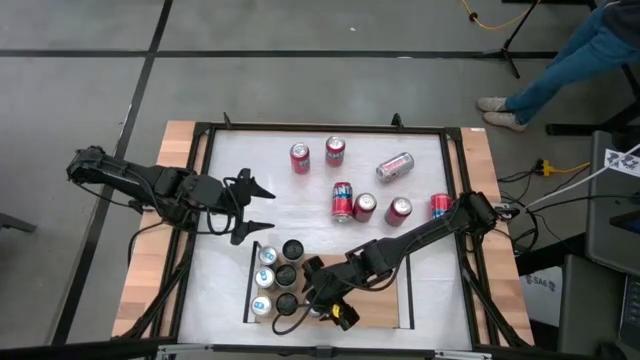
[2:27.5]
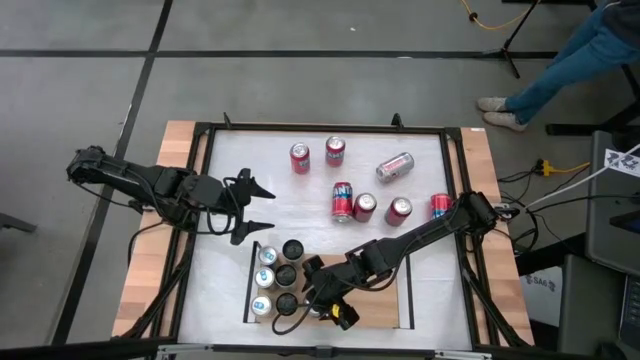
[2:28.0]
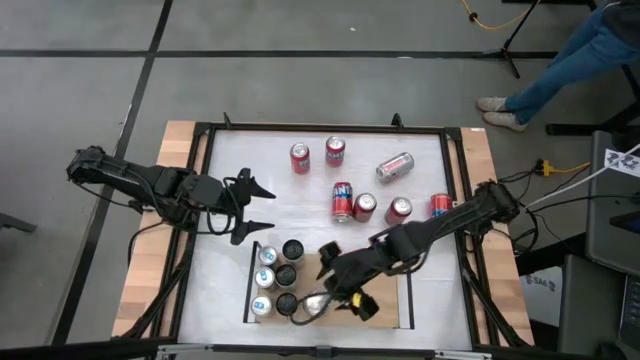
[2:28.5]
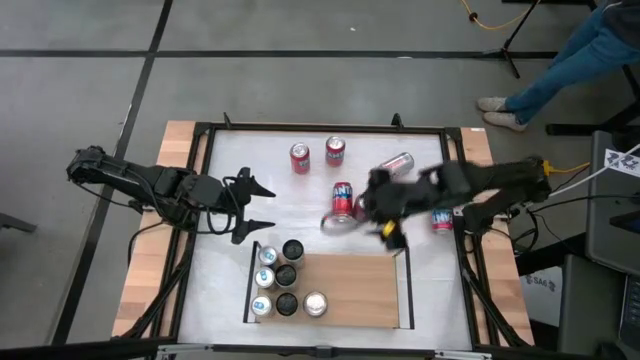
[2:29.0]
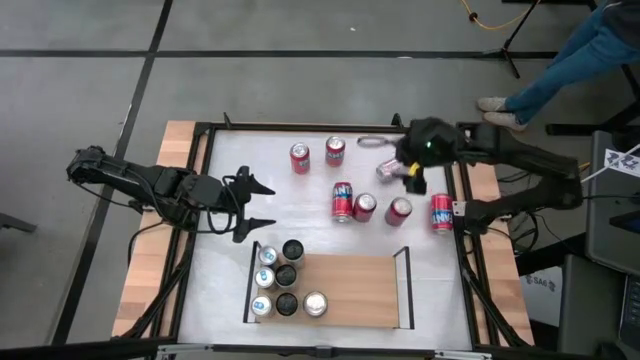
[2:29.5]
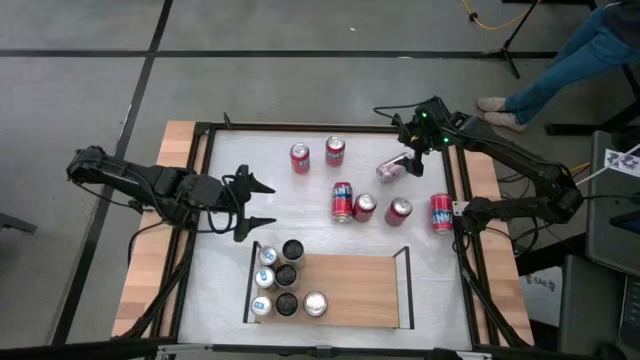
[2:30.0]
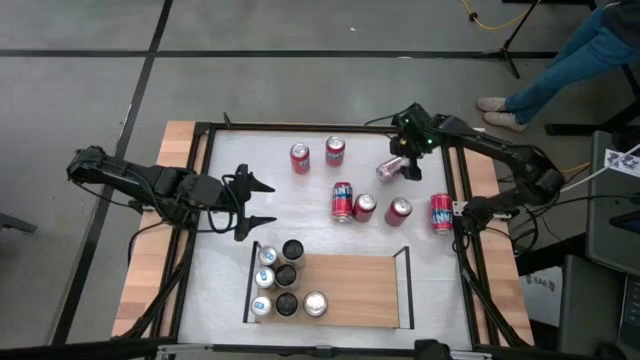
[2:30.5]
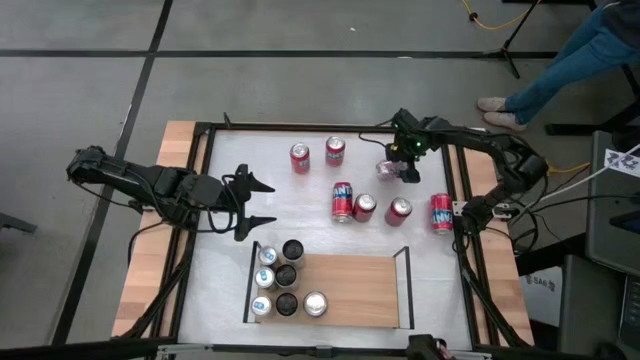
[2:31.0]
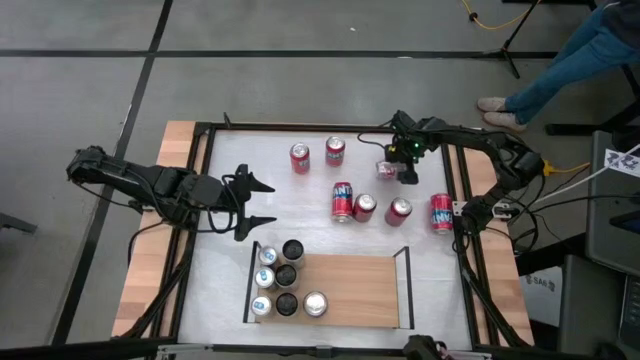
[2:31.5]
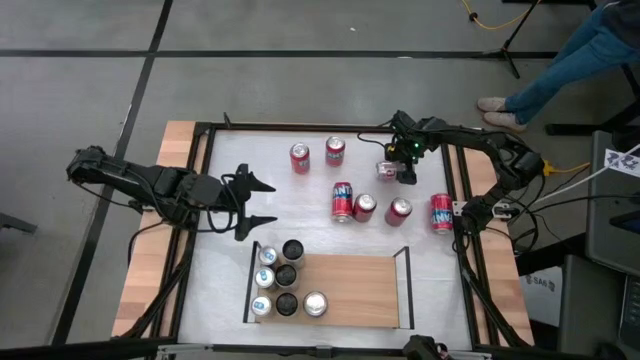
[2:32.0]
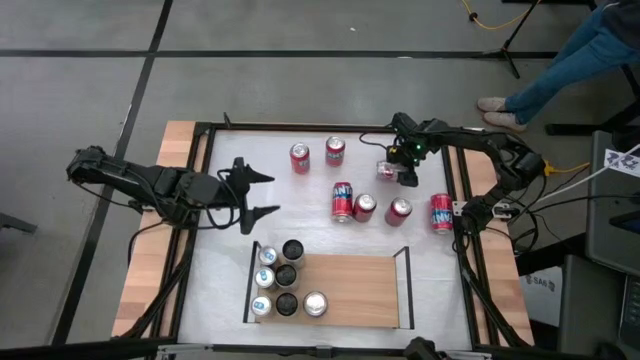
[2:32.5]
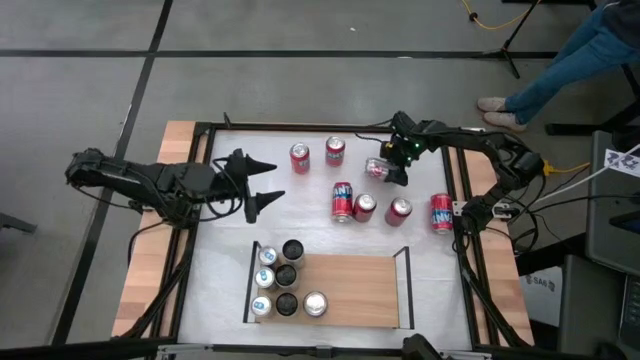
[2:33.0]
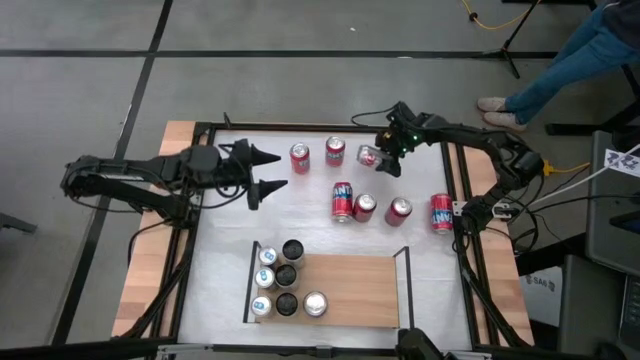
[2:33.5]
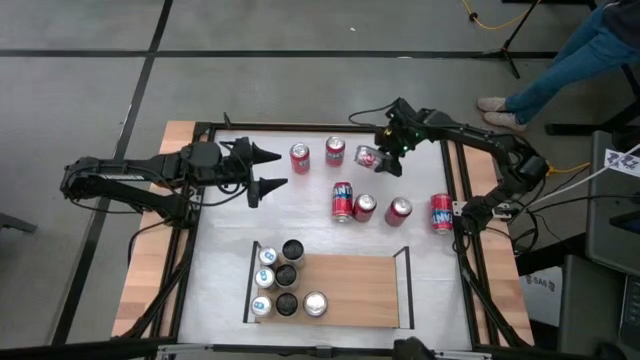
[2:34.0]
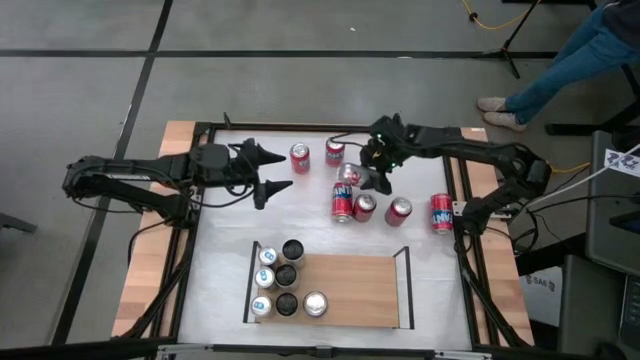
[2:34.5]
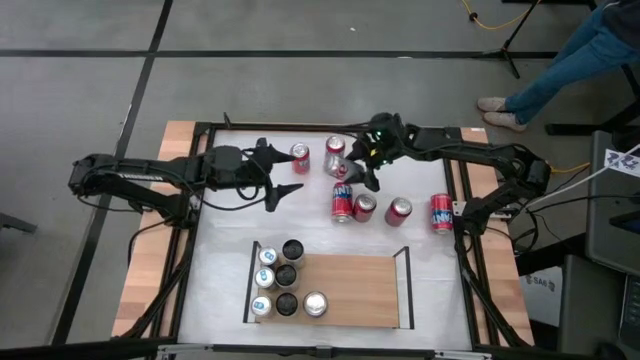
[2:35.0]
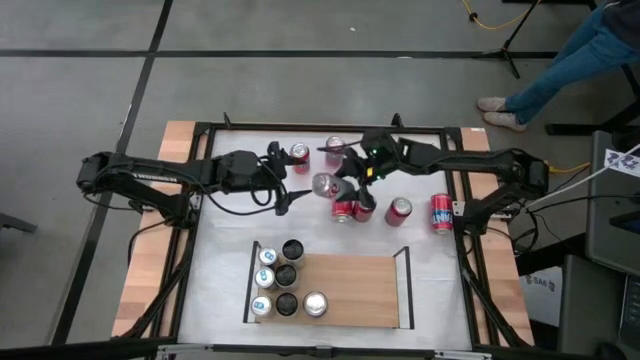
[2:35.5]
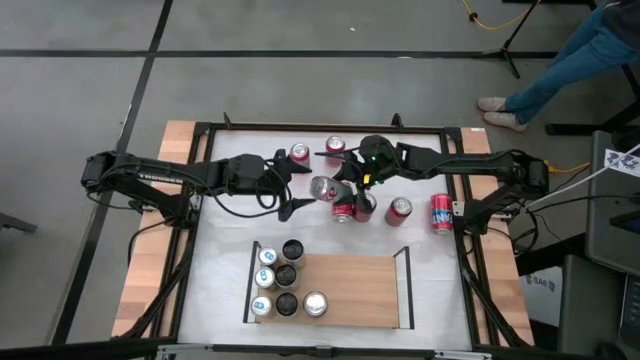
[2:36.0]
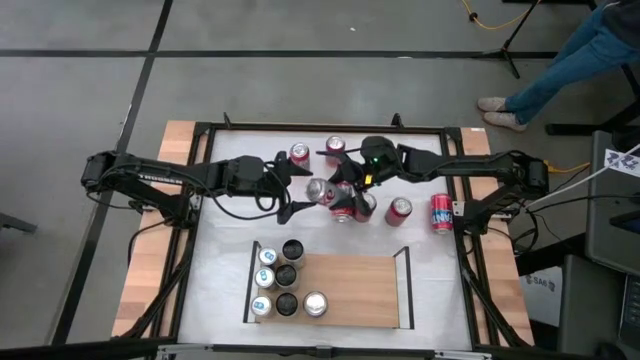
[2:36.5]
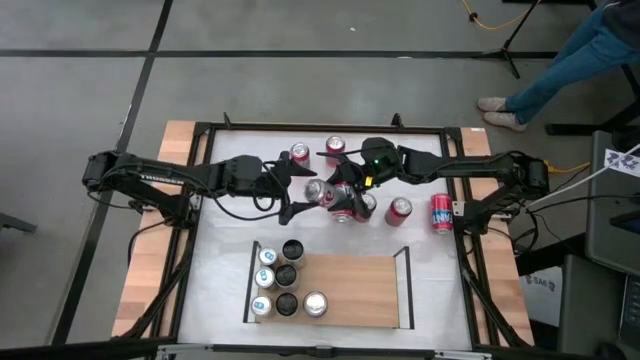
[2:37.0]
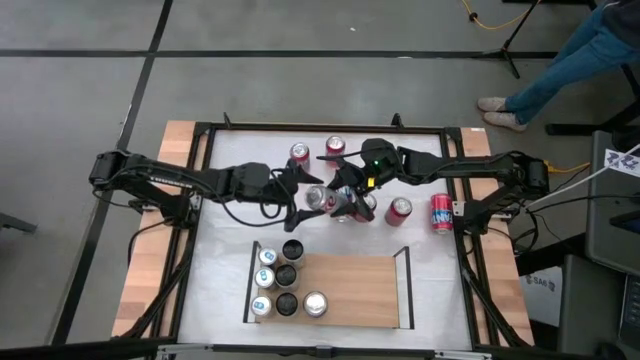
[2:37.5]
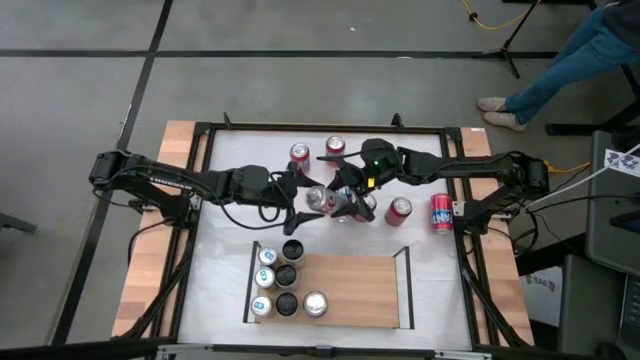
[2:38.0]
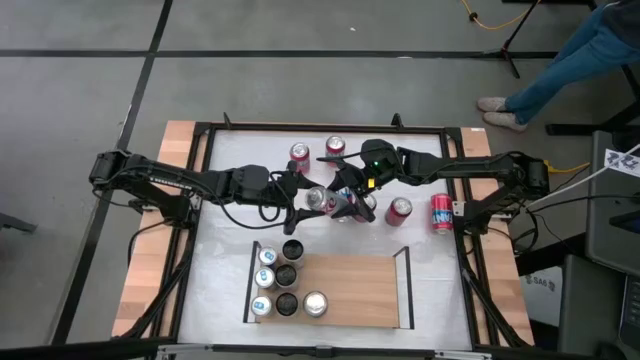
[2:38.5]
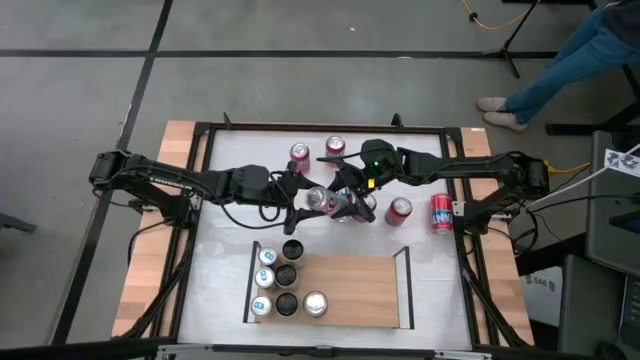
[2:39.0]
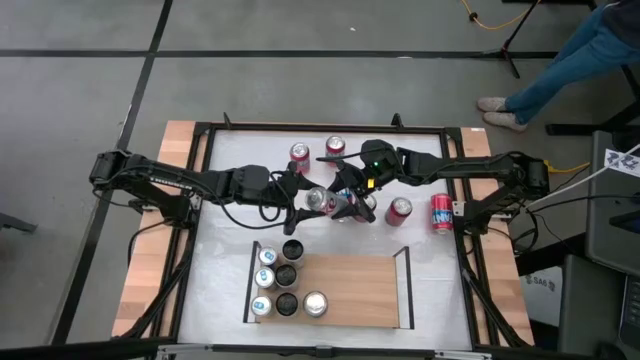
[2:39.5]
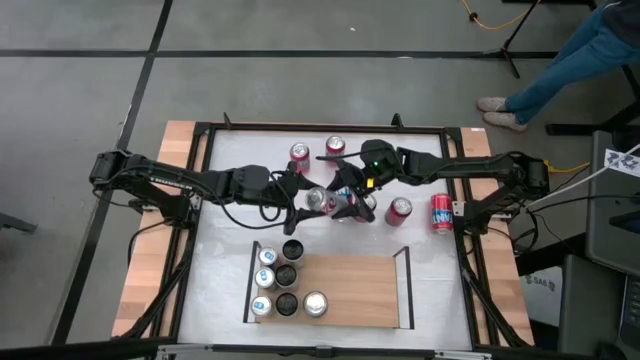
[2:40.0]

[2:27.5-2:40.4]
Task: Place canned beverage on shelf
Put the silver soda can on the shelf aligned with the other silver soda can

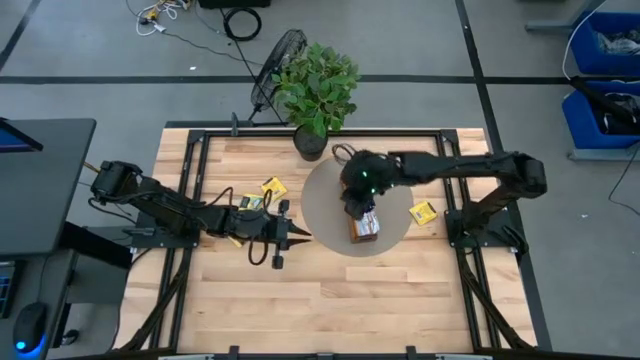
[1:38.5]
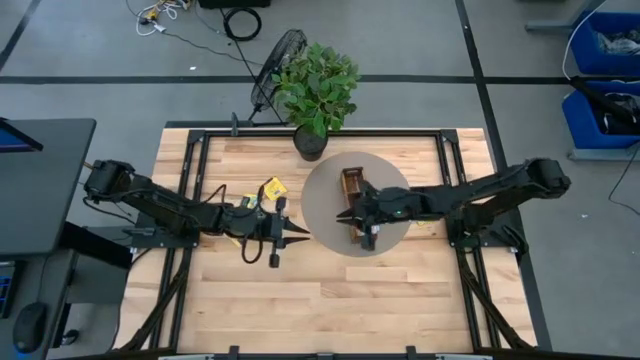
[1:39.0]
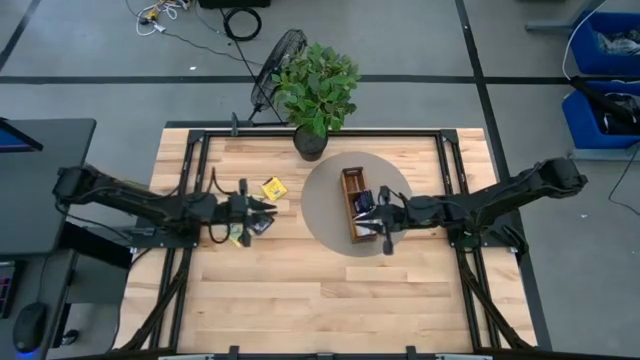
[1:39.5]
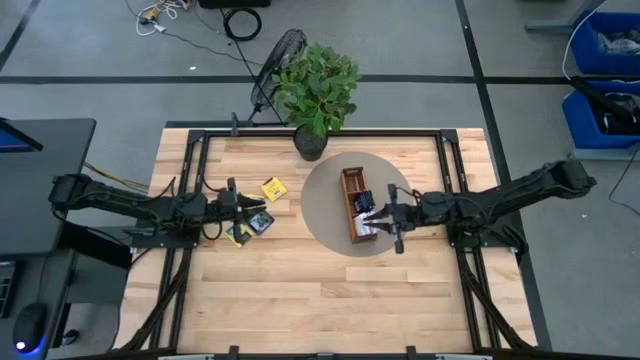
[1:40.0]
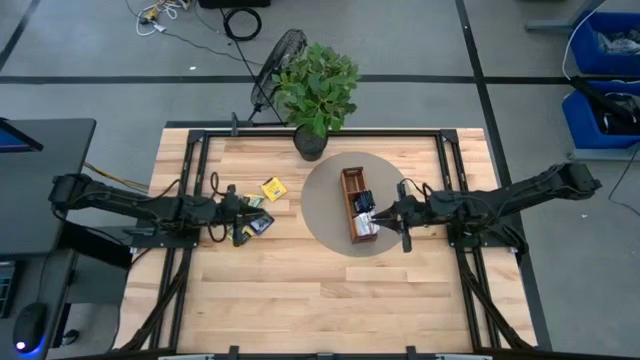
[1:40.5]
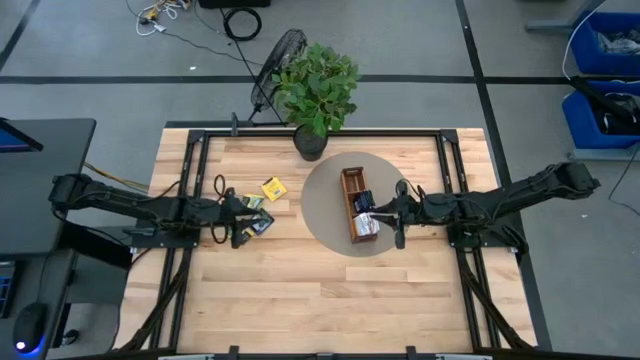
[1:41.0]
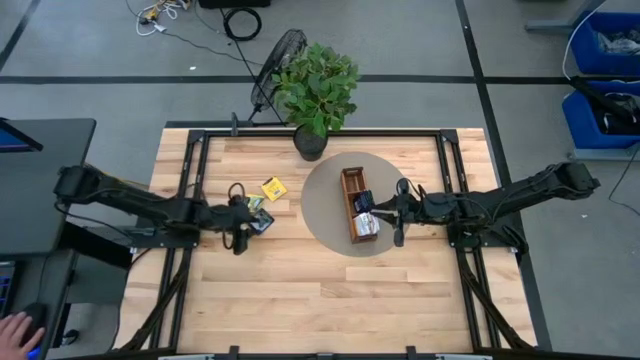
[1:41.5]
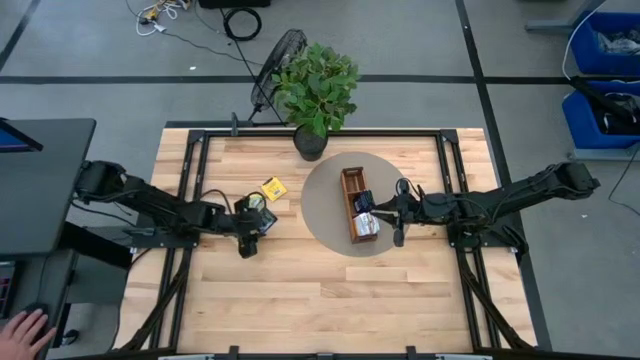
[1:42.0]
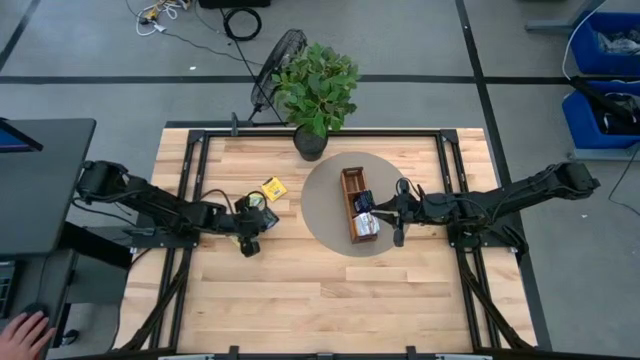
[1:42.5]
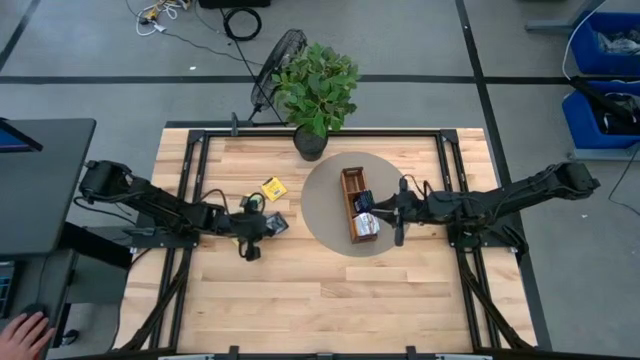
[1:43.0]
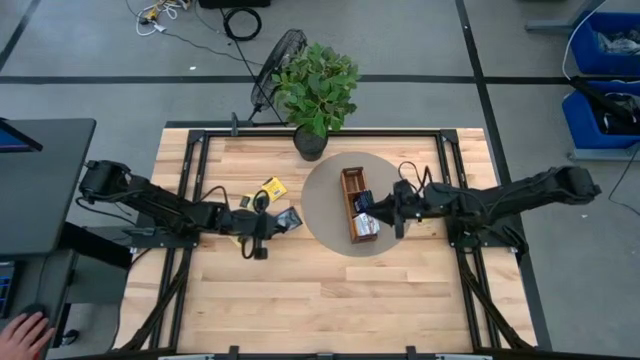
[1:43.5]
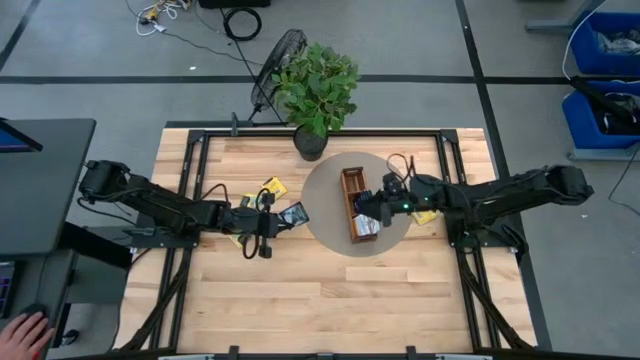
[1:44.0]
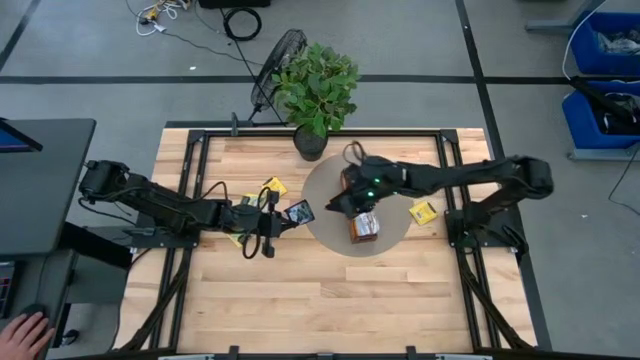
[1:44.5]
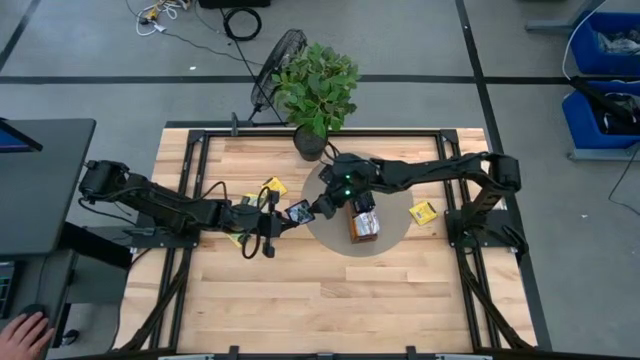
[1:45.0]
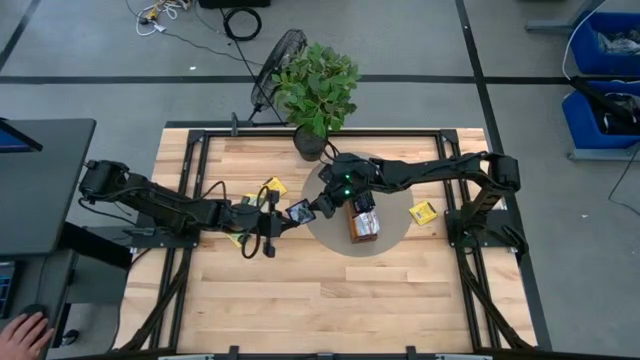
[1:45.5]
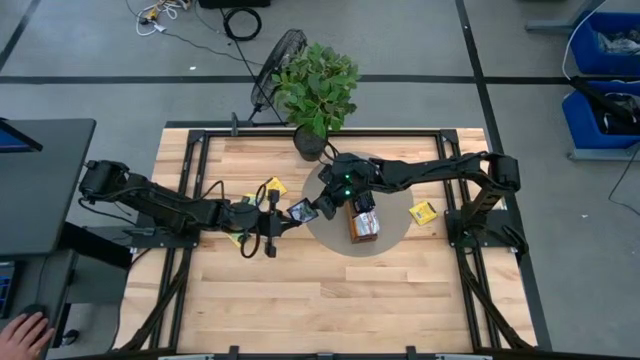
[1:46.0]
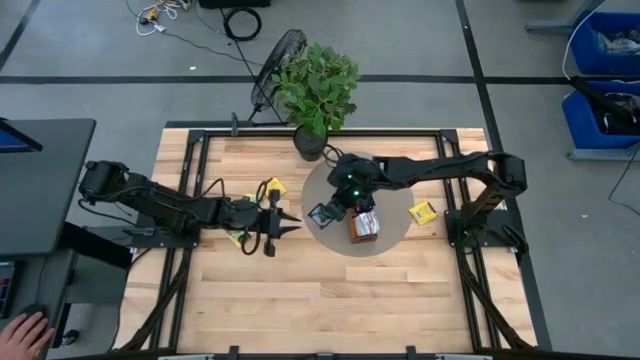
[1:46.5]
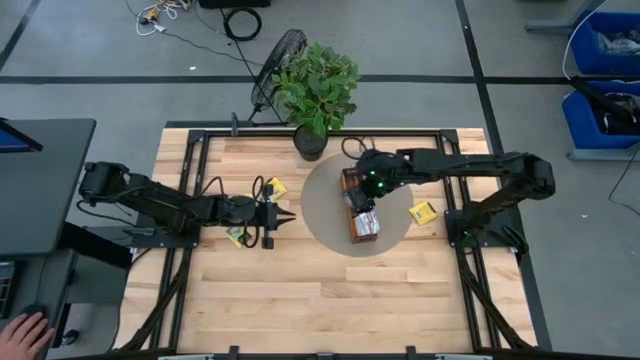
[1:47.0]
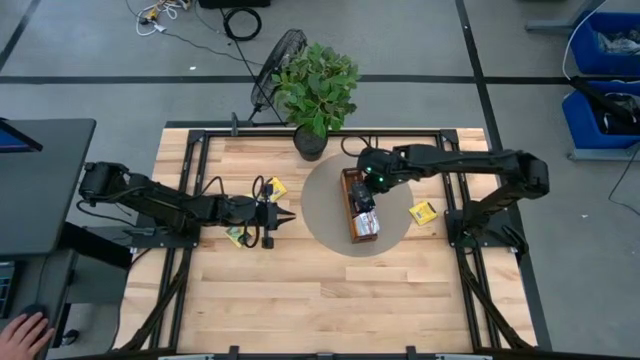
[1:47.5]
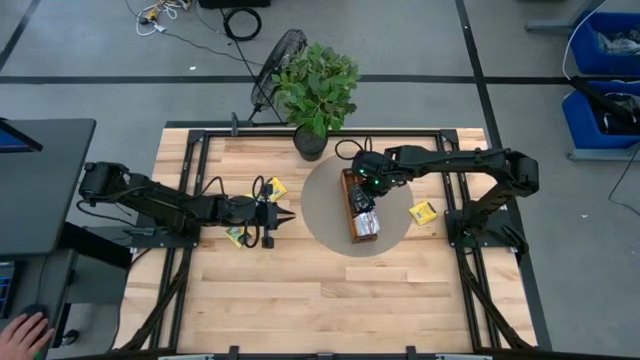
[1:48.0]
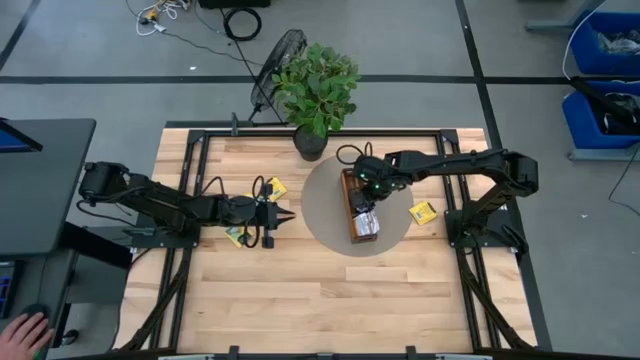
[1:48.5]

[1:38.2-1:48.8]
Task: Pick & Place Tea
Put the purple tea bag into the middle section of the wooden organizer
